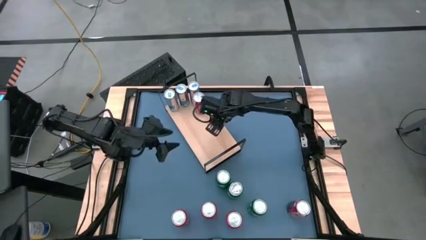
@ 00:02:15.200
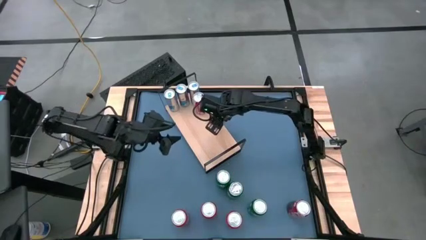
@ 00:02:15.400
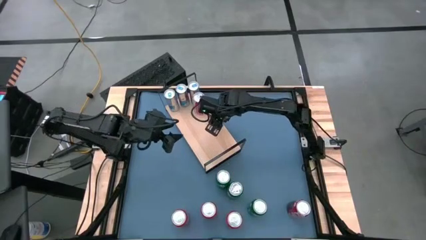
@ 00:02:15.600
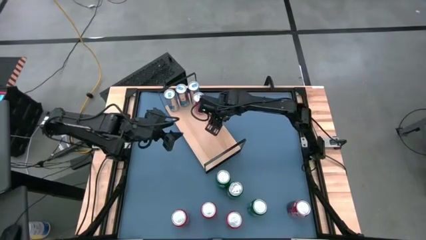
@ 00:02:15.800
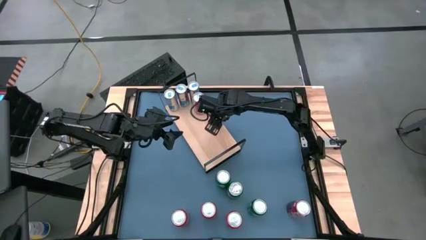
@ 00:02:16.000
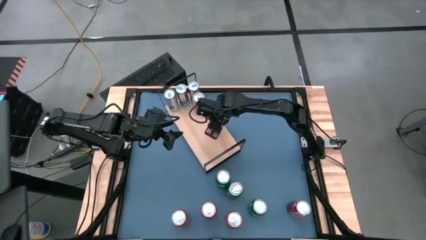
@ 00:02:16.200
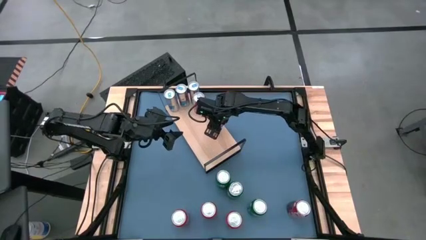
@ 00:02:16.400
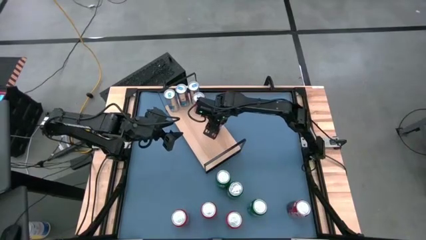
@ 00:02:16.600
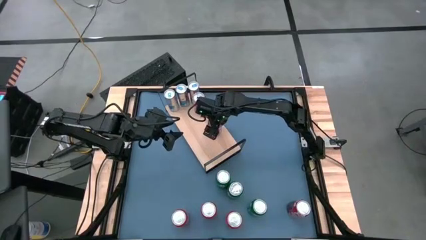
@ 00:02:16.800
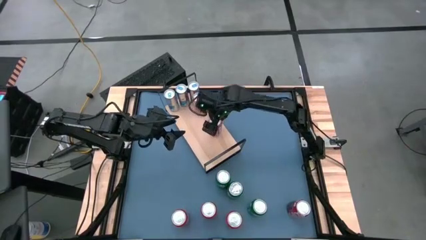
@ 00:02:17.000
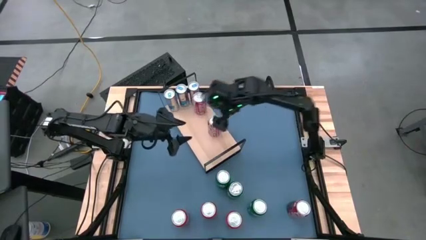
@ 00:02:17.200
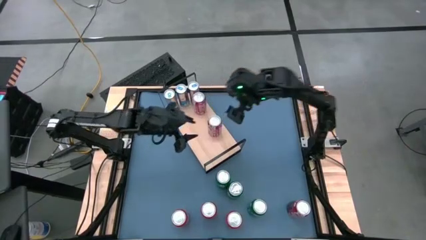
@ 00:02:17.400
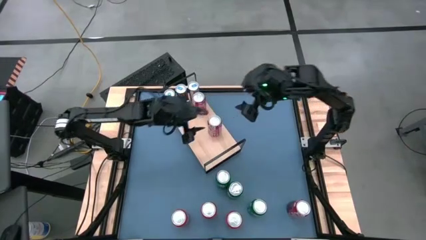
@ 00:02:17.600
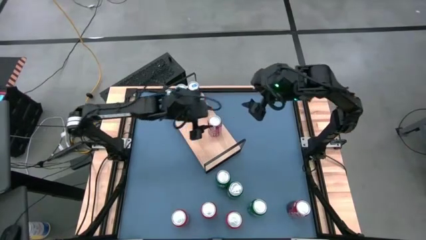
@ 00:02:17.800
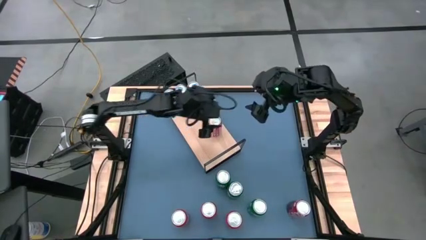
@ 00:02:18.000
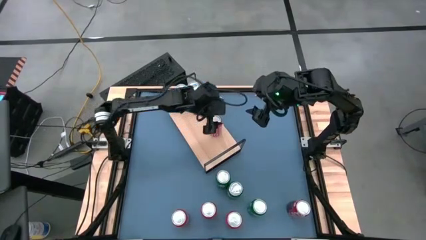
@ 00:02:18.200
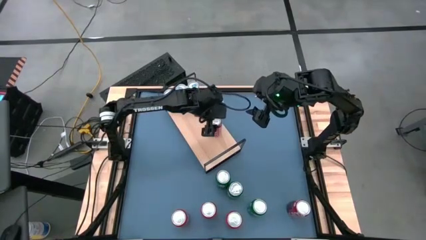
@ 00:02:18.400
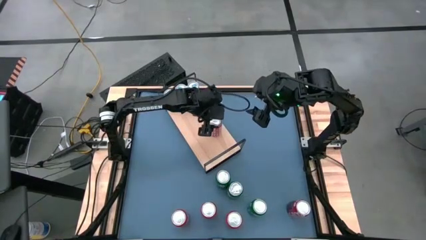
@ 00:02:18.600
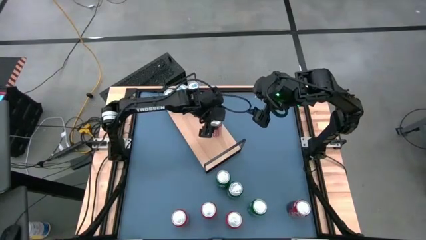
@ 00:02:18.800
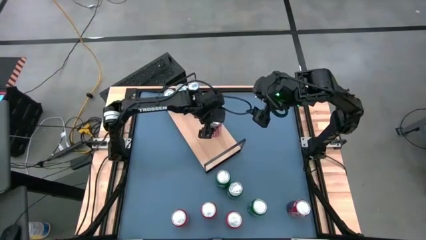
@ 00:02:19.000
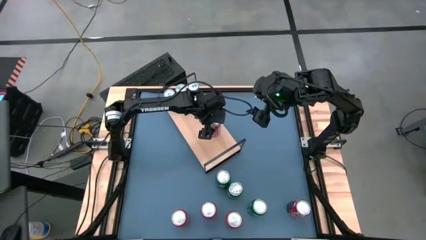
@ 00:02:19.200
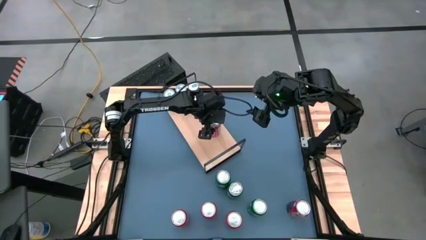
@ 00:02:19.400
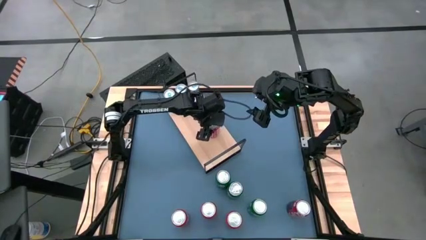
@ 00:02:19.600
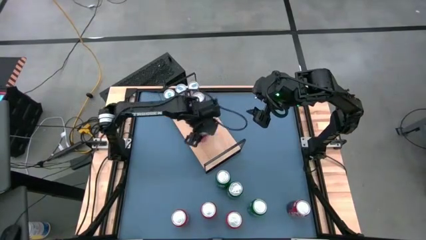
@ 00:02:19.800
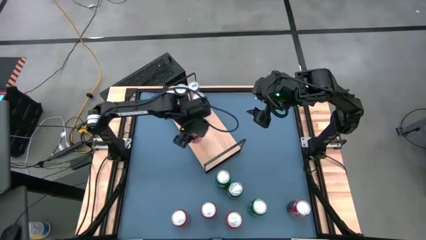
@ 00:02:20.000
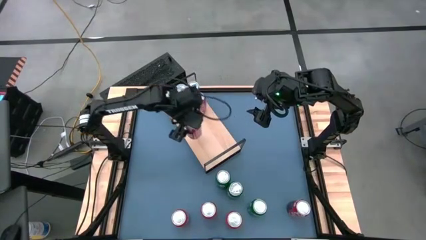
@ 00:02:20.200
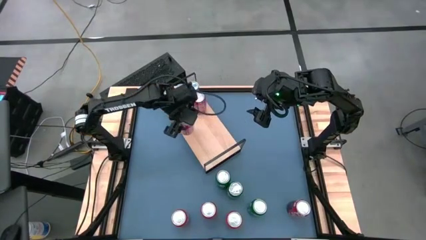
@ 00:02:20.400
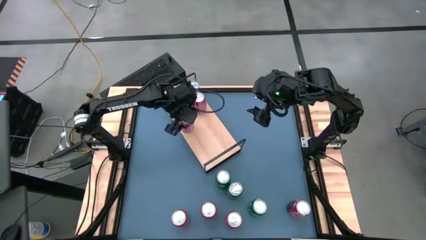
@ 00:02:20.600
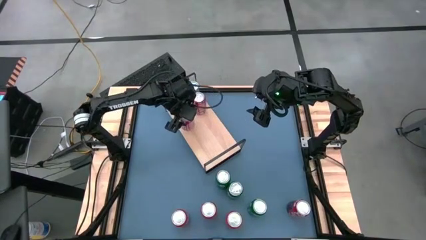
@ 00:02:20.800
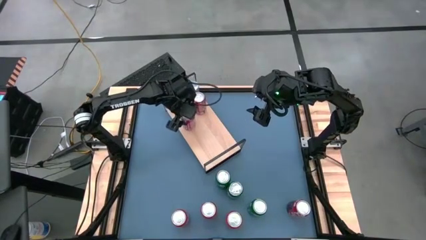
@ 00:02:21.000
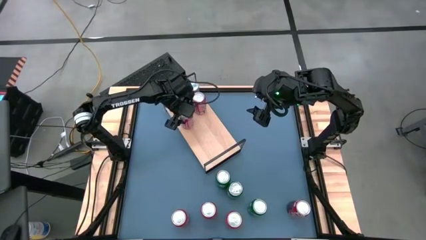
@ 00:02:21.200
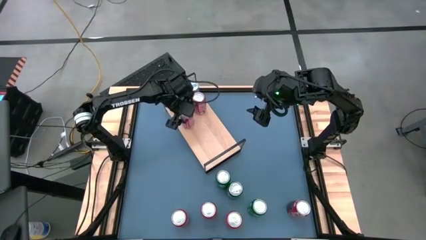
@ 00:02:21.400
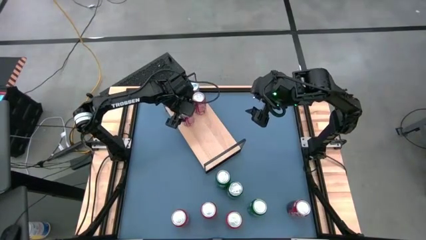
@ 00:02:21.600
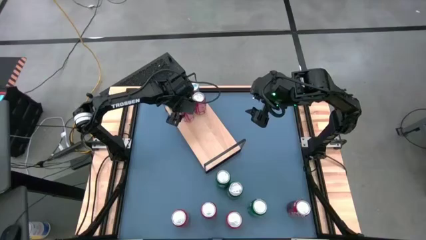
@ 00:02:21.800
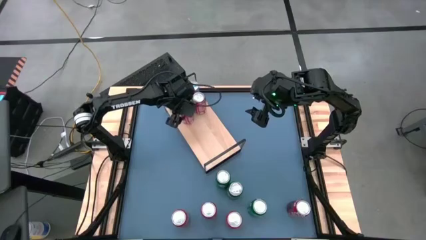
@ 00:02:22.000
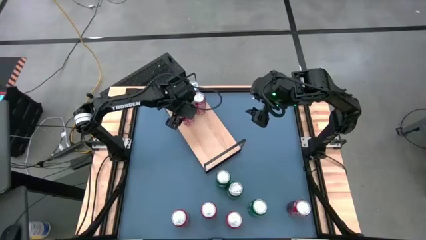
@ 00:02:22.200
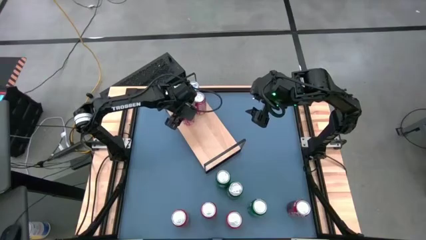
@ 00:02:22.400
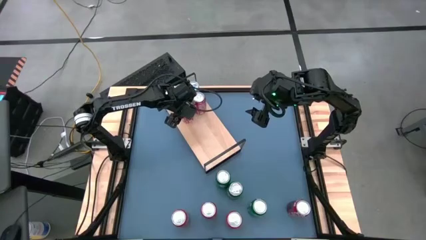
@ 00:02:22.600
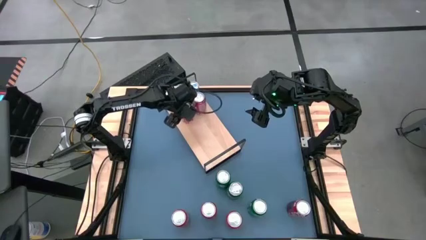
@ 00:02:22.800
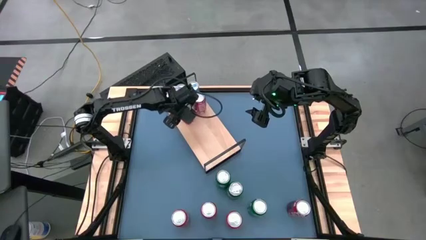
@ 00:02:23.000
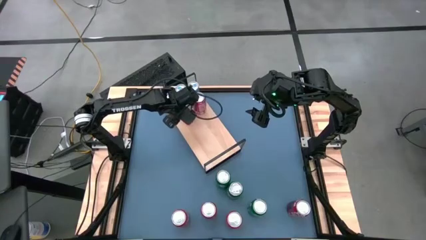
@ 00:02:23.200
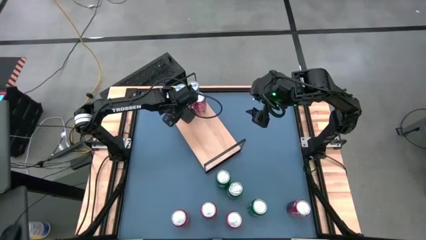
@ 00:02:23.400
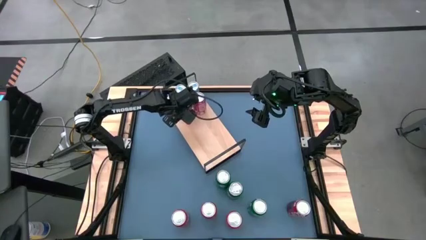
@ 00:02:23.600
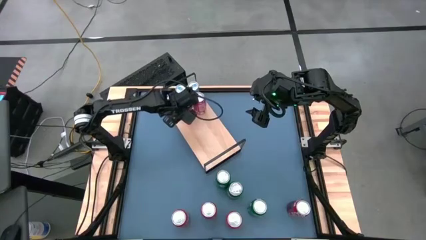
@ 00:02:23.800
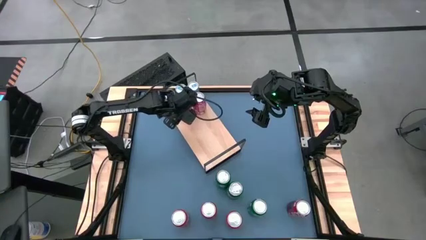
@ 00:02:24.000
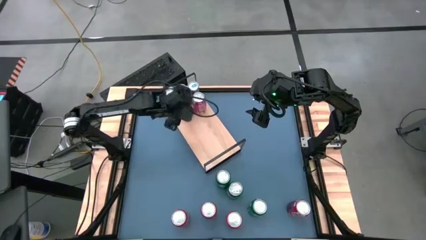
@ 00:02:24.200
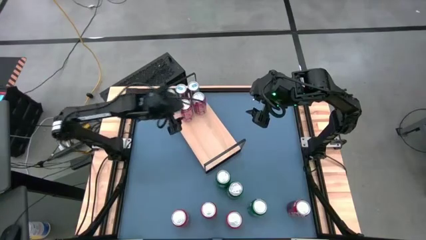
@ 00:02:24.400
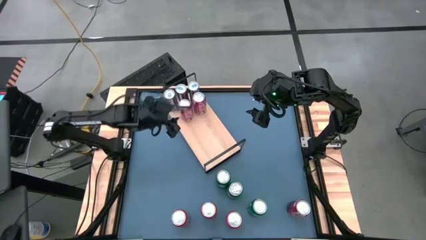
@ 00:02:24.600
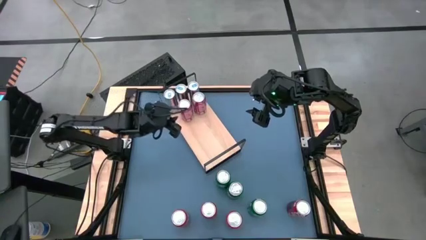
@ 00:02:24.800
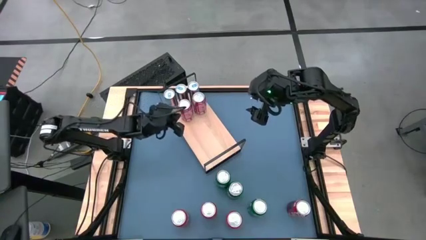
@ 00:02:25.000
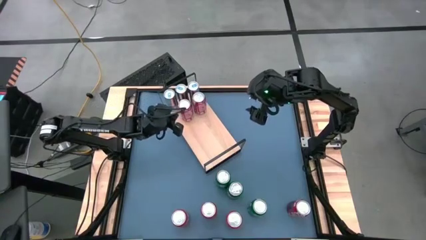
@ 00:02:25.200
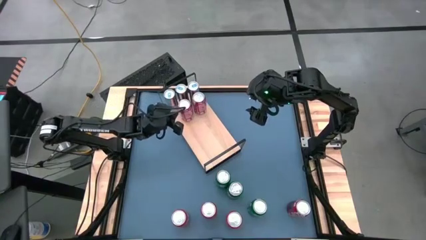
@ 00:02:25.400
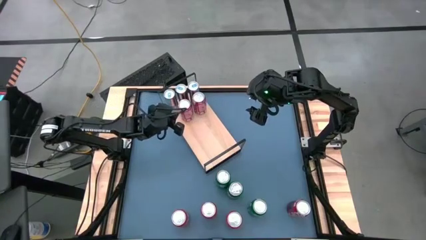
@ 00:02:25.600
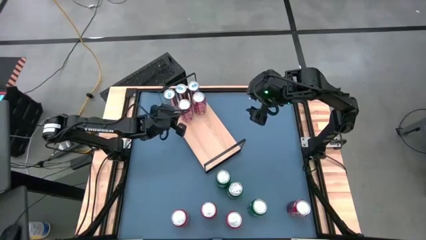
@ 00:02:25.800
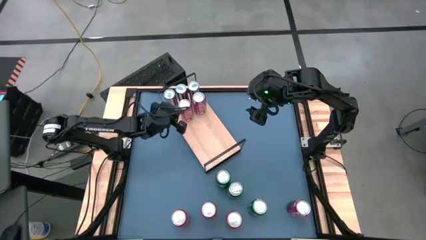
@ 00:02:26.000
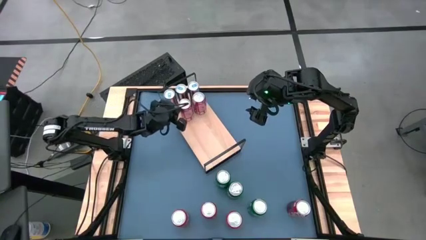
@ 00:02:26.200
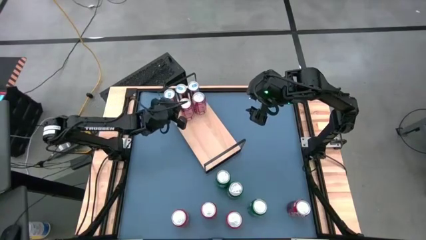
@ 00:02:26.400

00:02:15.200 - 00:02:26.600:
Task: Place canned beverage on shelf
Put the left red white soda can on the shelf aligned with the other red white soda can
